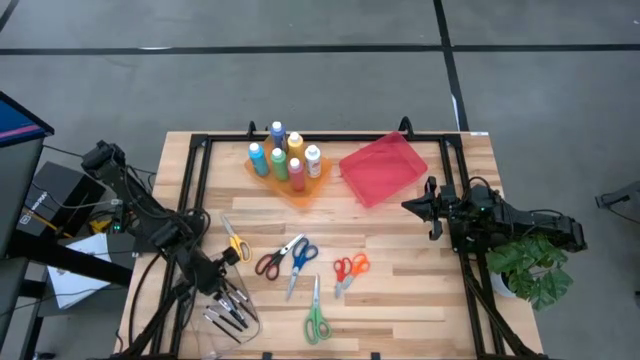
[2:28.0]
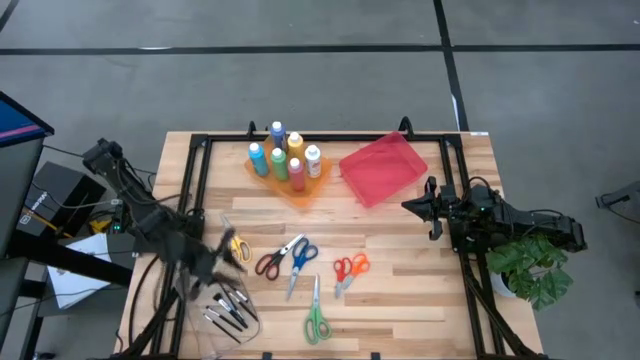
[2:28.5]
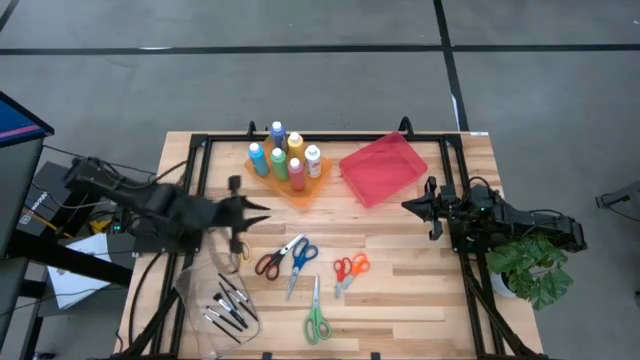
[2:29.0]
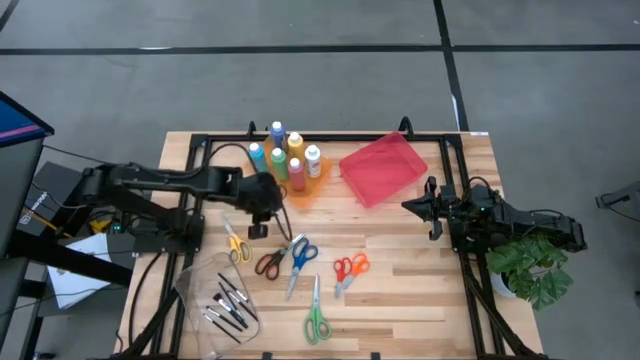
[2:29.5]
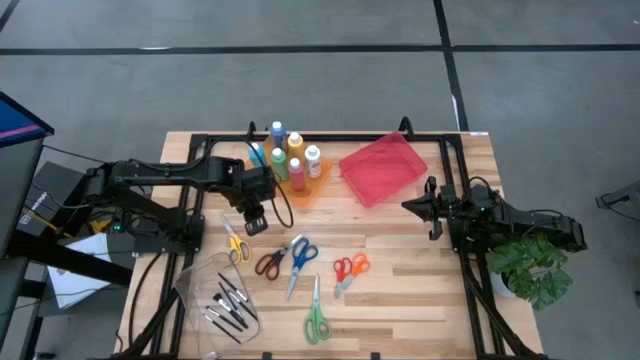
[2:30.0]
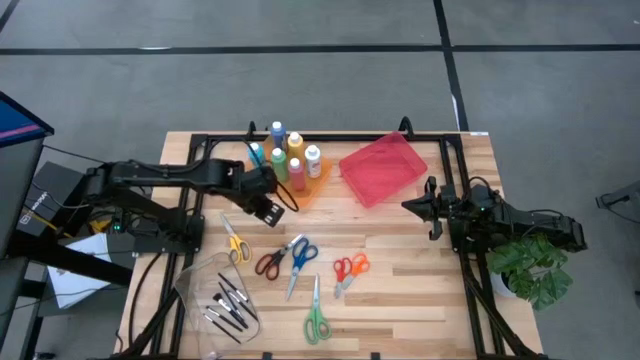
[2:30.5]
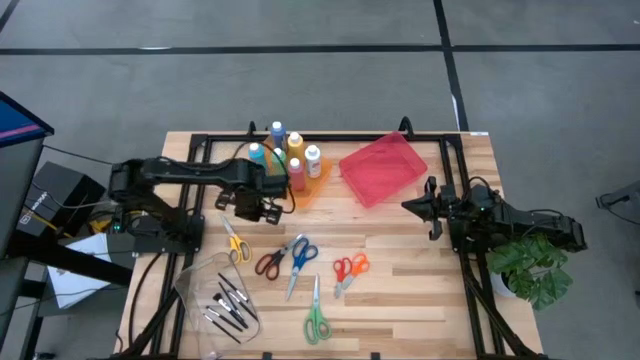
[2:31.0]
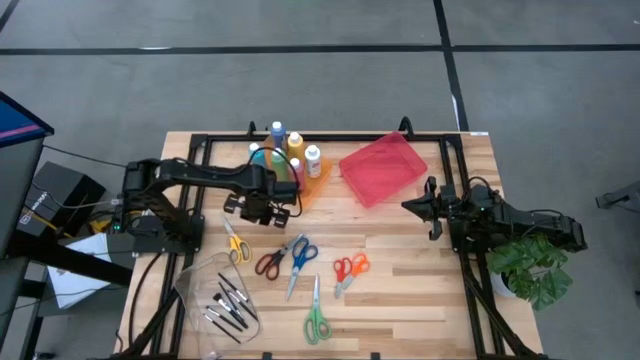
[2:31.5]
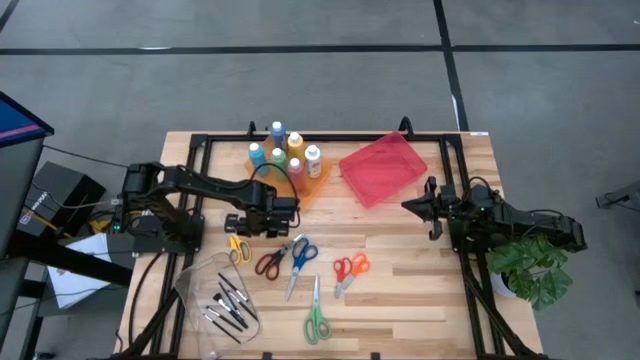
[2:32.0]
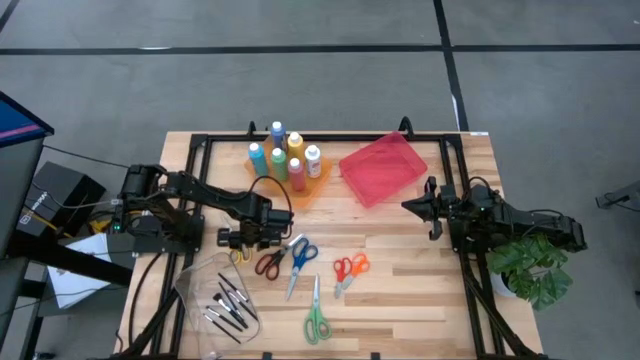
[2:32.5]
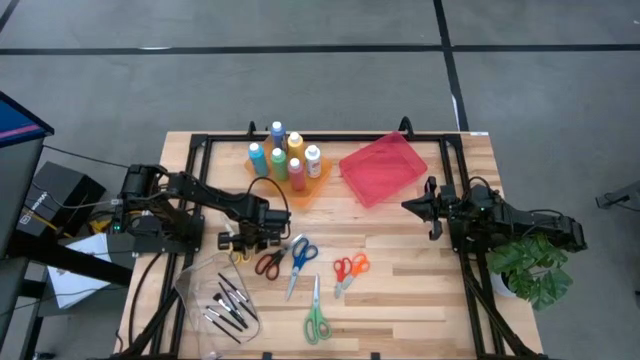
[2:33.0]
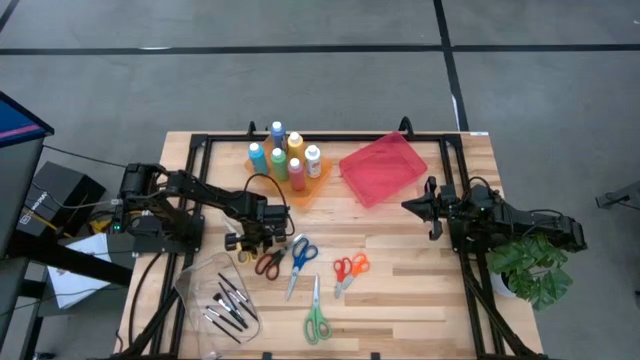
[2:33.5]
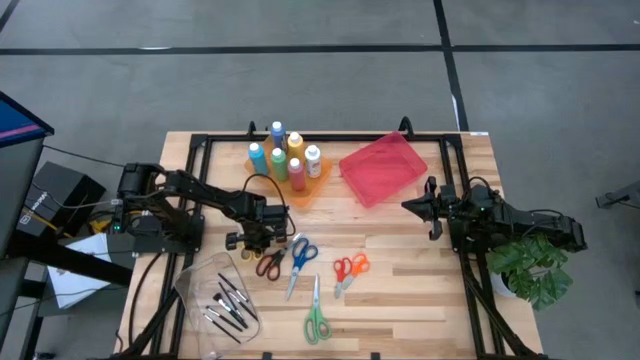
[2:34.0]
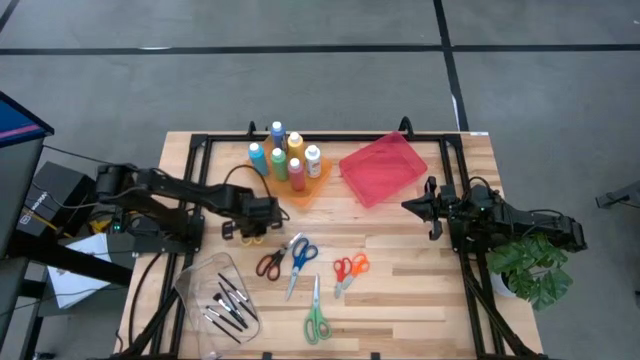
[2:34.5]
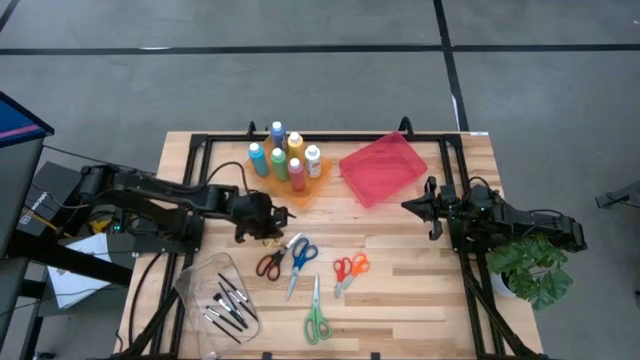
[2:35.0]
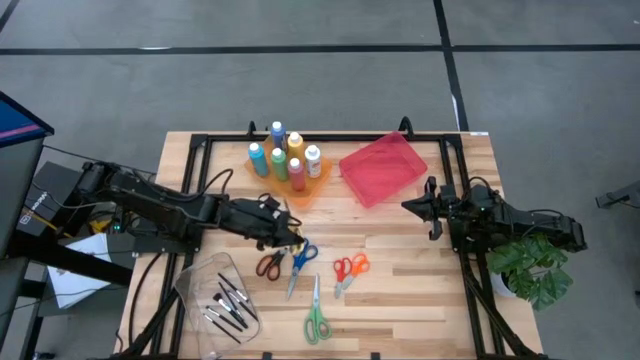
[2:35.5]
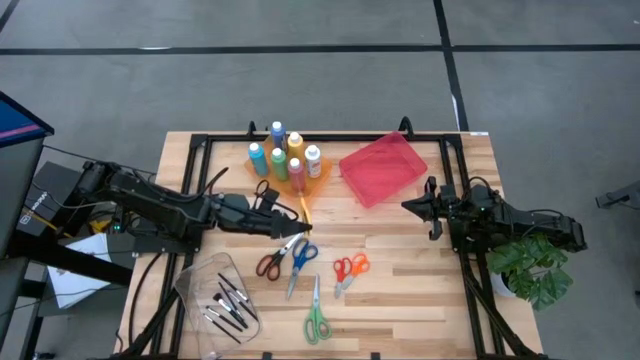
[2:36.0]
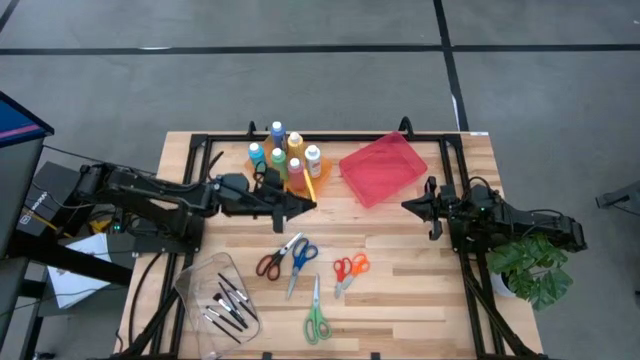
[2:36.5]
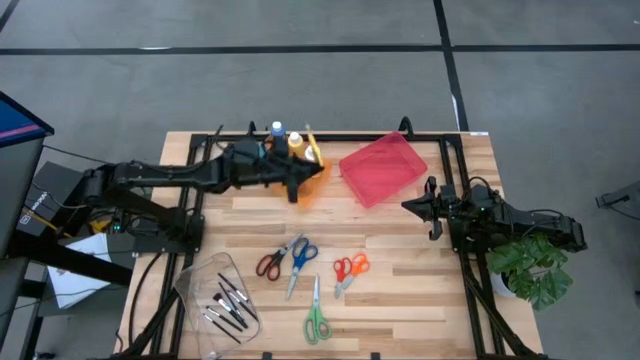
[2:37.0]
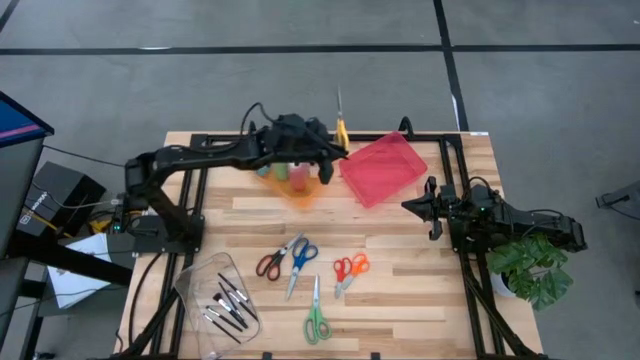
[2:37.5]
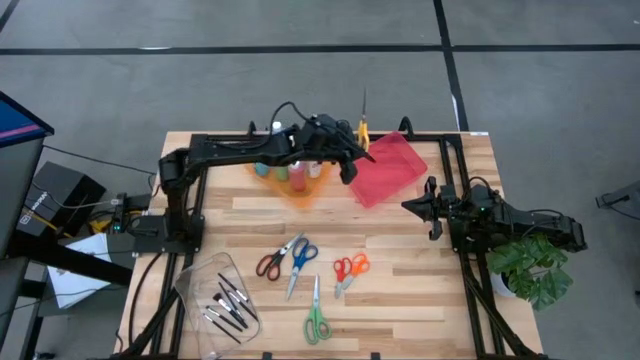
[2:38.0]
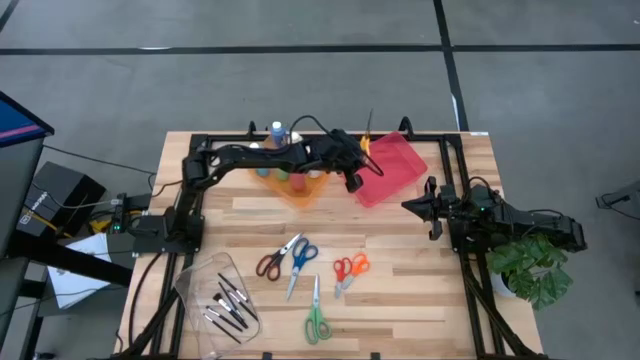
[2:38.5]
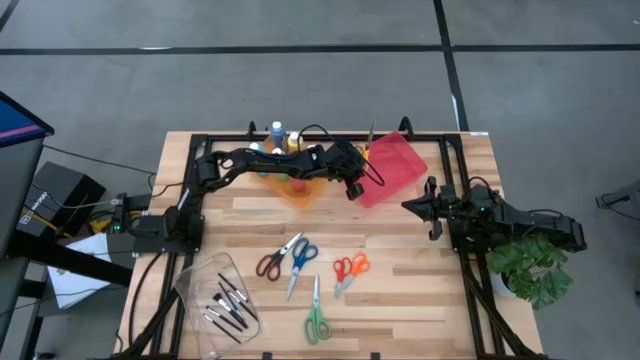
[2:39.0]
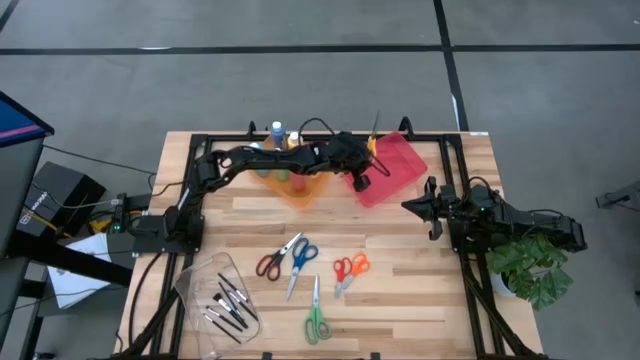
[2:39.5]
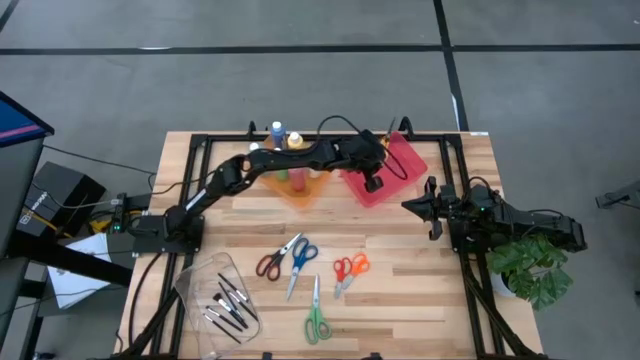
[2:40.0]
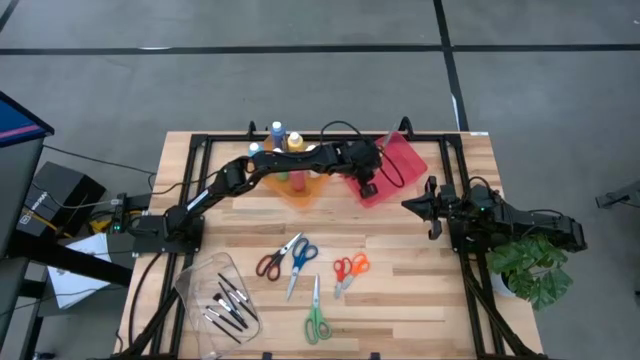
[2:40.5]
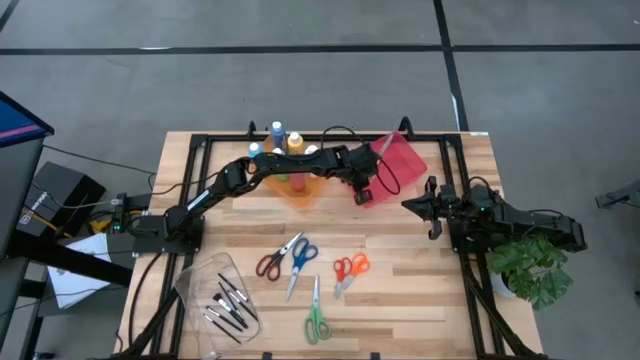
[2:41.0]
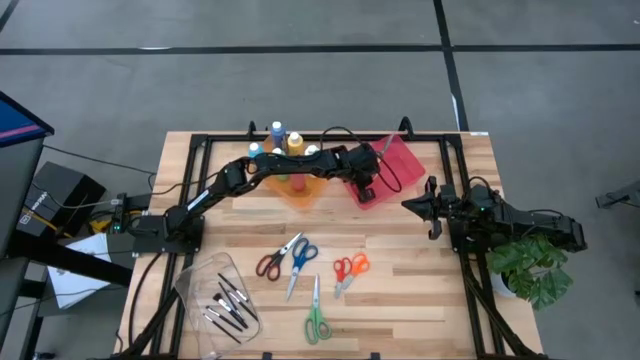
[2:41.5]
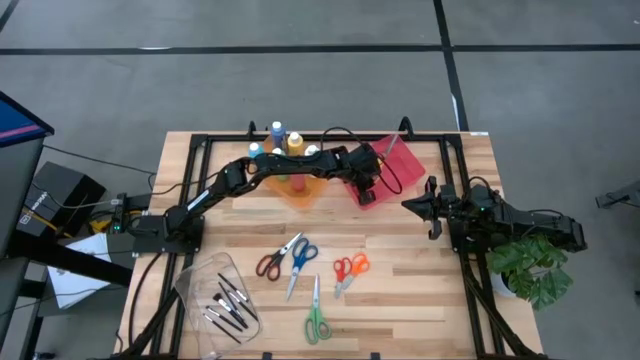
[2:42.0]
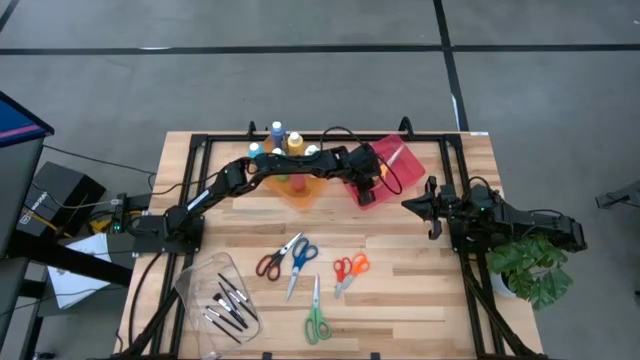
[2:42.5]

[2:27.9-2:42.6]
Task: Pick & Place Paint Supplies
Put the yellow scissors into the pink bin

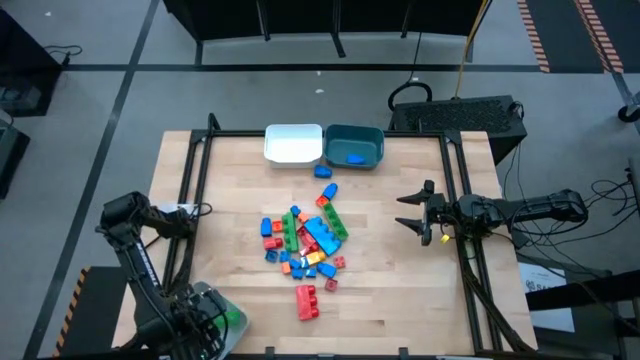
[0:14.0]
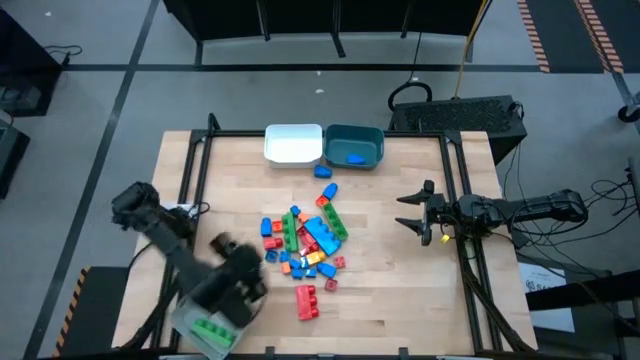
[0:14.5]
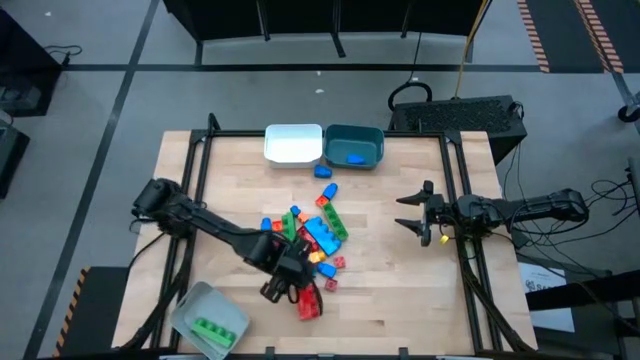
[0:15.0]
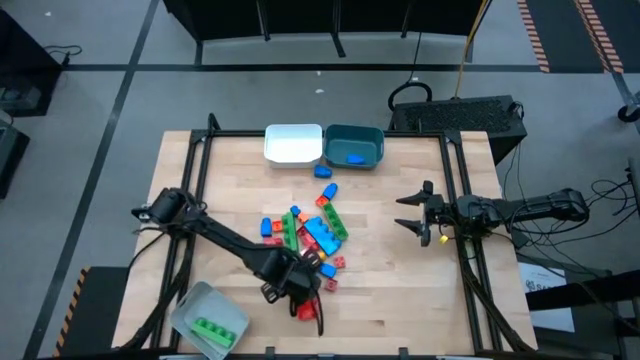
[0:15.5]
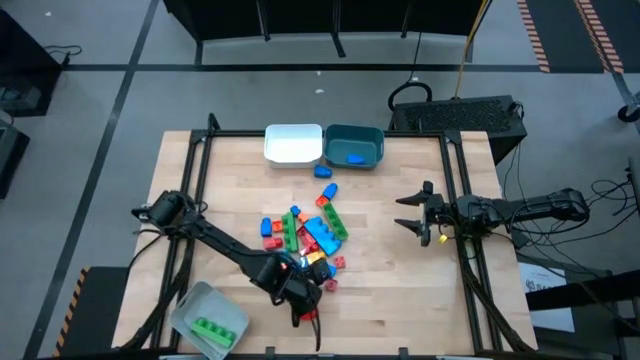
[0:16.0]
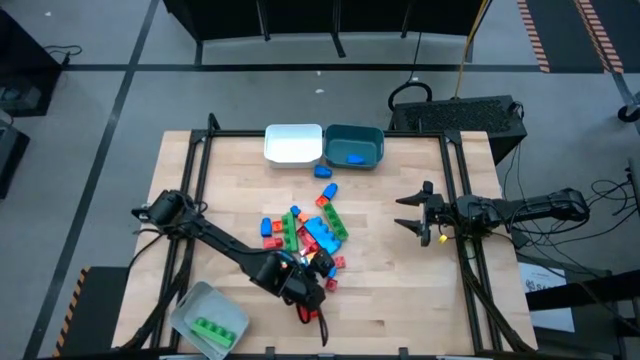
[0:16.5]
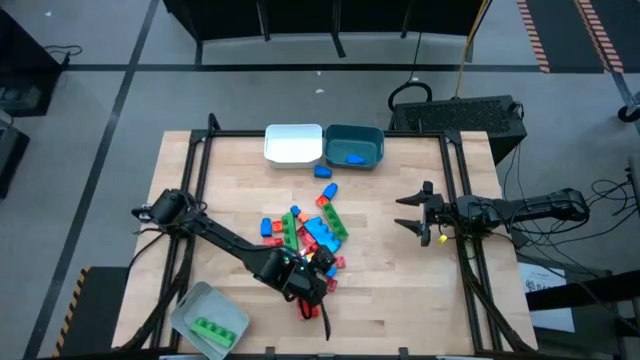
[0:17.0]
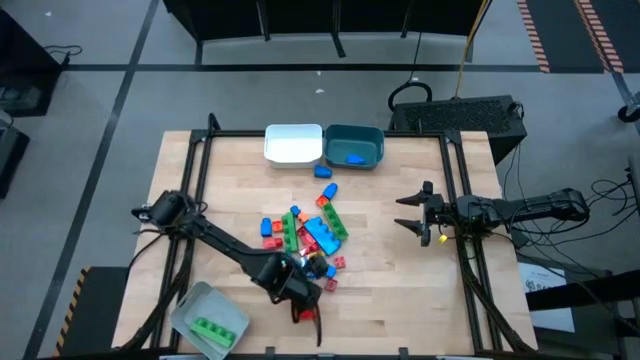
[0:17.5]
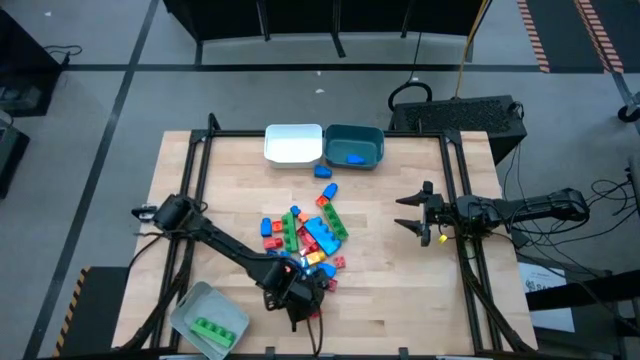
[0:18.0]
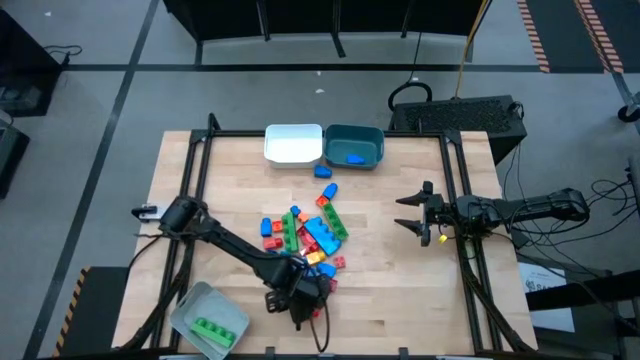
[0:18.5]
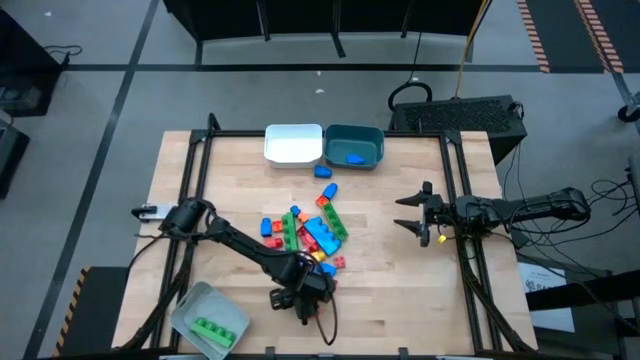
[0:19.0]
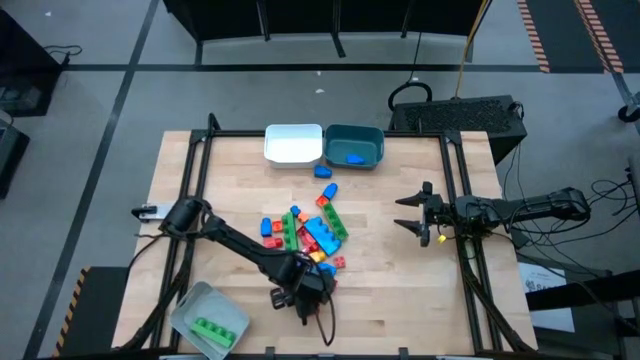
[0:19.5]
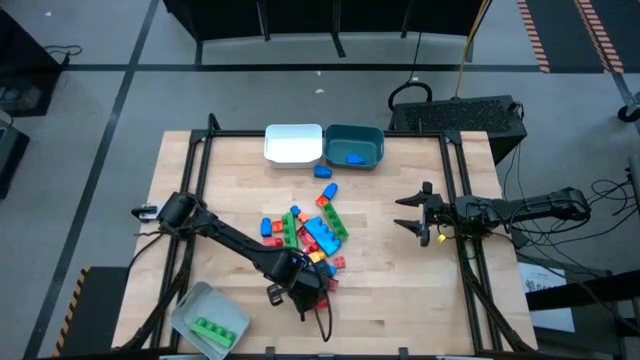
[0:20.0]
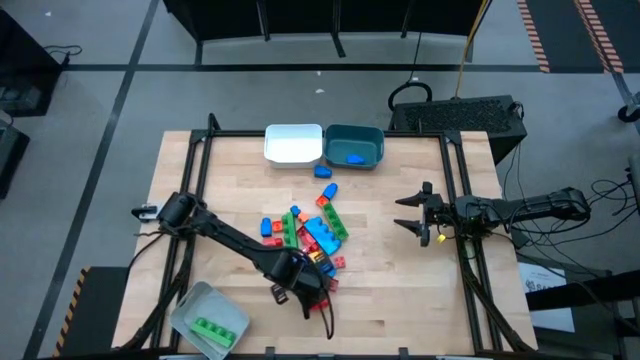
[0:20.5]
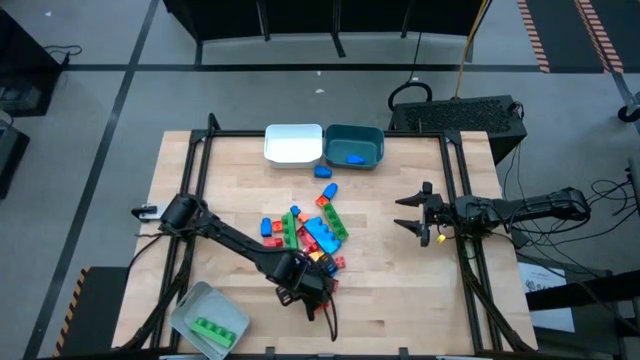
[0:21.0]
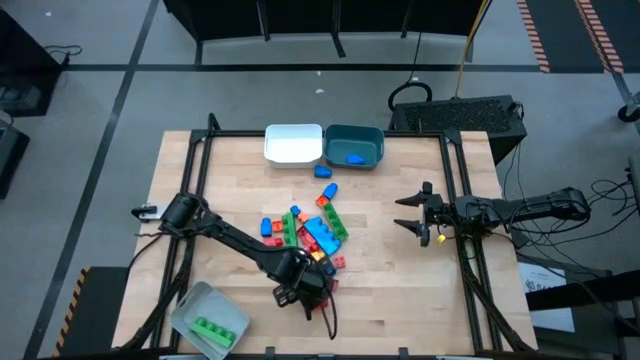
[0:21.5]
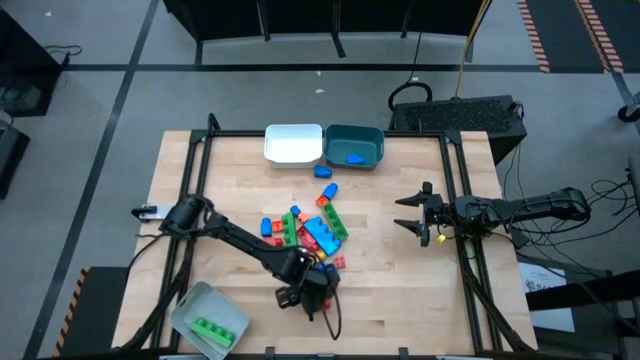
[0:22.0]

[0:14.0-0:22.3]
Task: Sort blocks by size
Put the red rectangular 3 stud game piece into the gray bin
